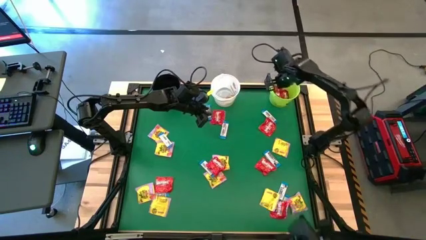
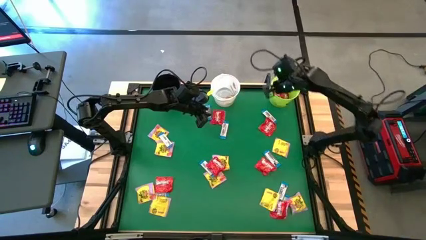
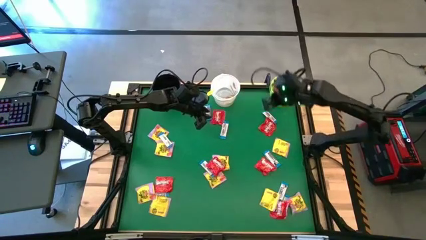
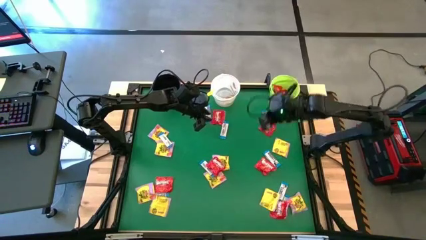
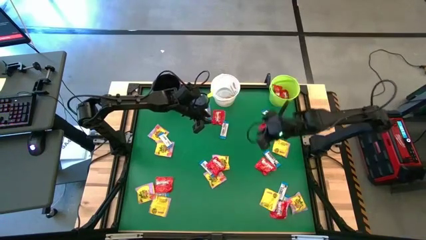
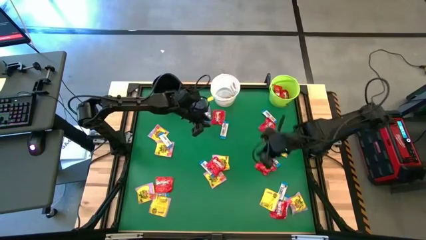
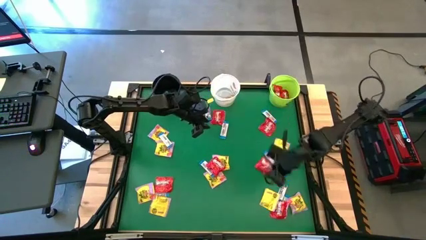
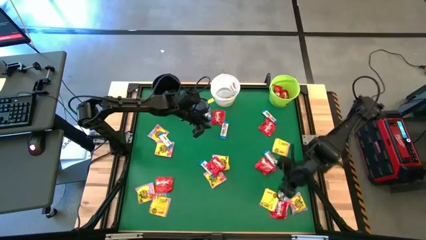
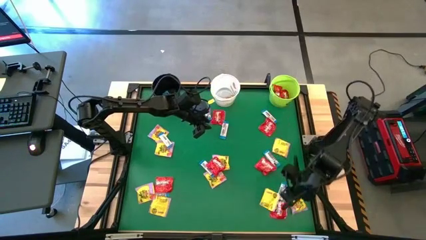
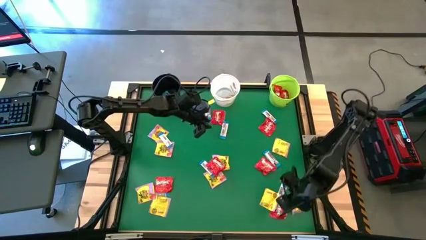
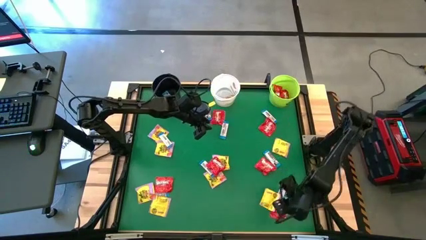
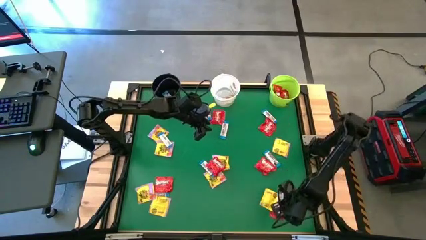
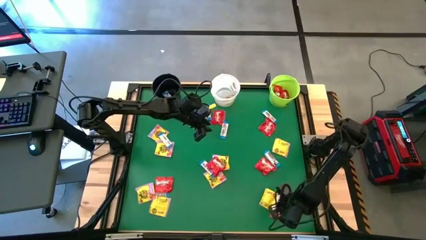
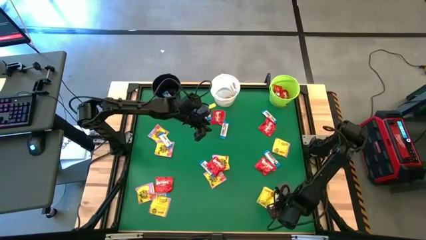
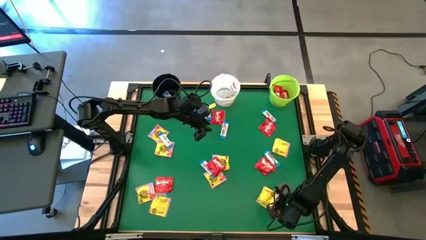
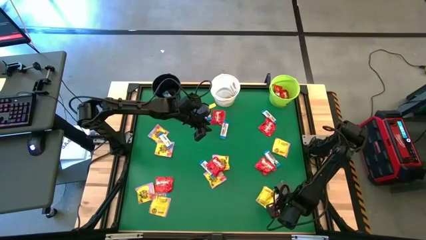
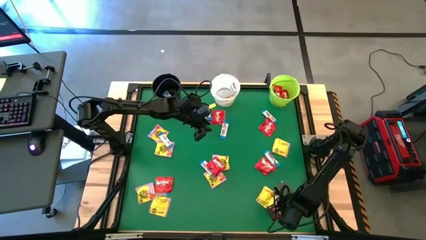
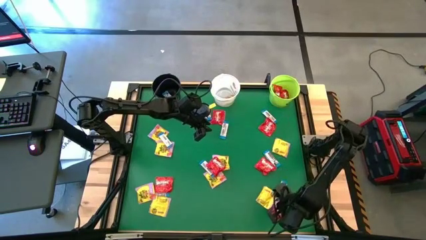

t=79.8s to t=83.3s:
Task: Sort candy by brand, put in halloween buckets
Put the red candy into the green bucket

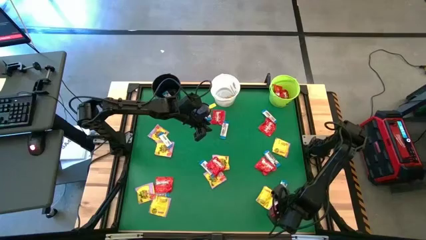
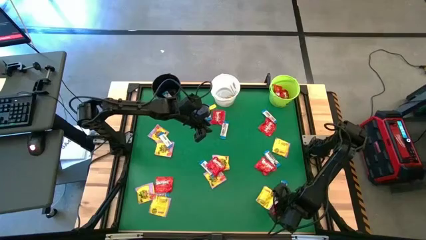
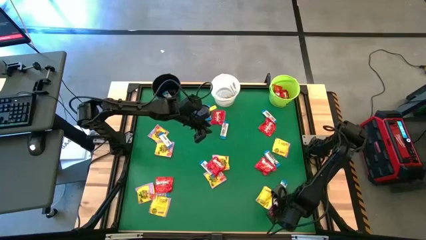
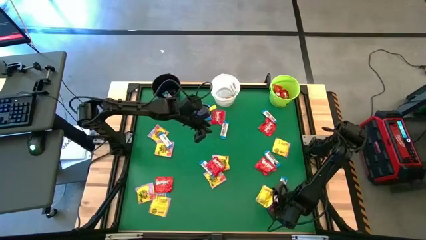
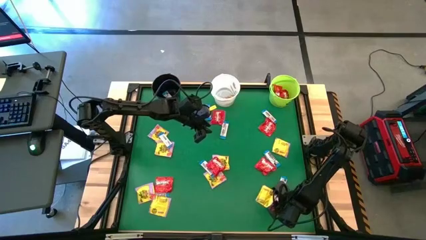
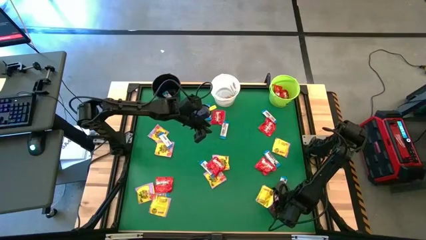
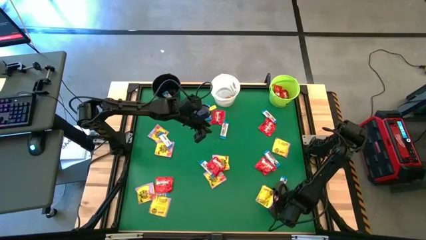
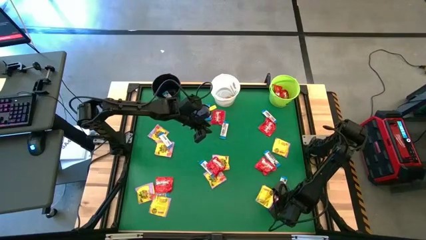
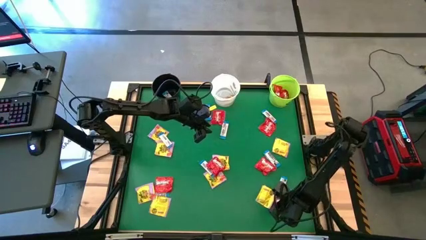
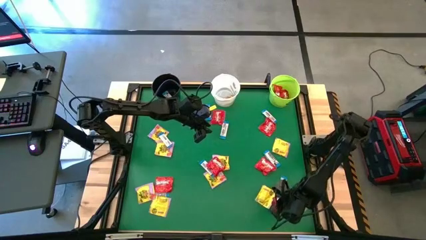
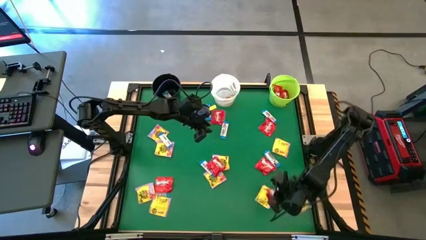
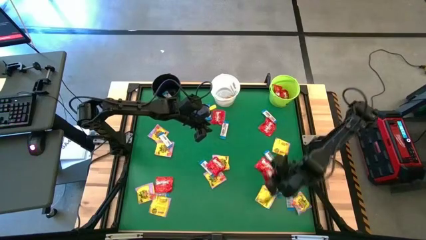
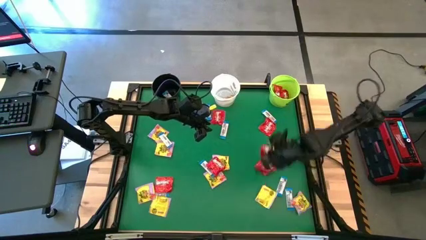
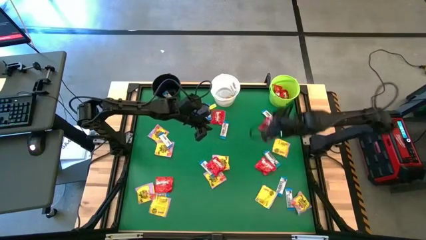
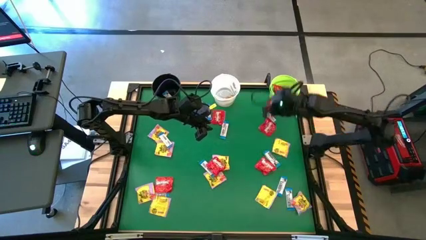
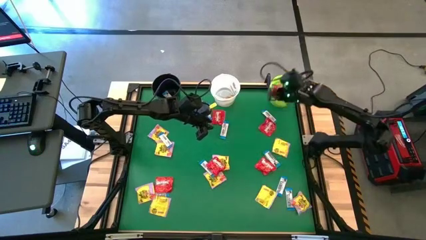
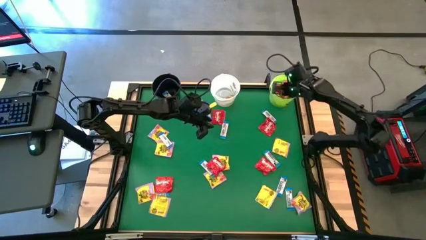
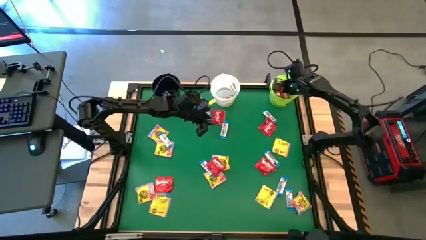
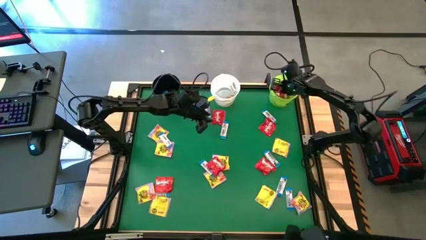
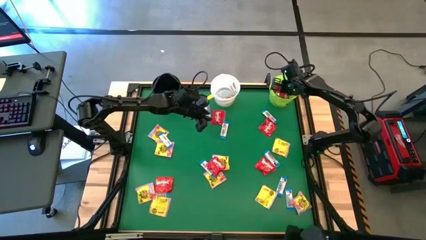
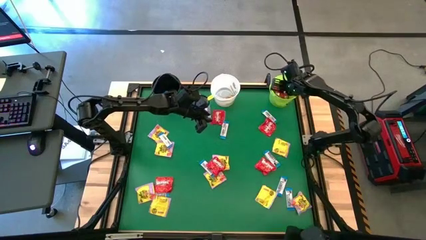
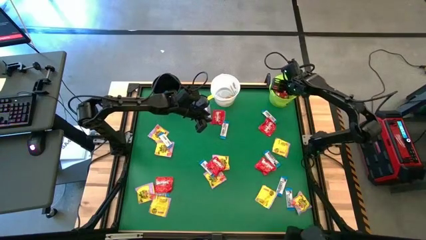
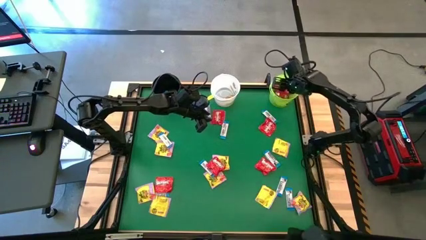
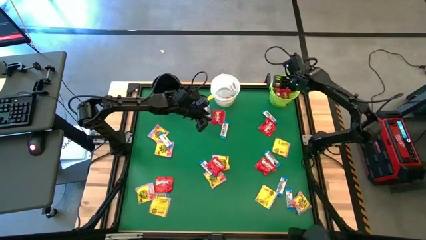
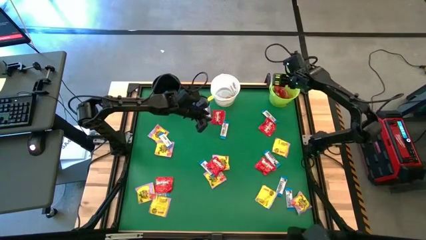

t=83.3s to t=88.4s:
Put the red candy into the green bucket

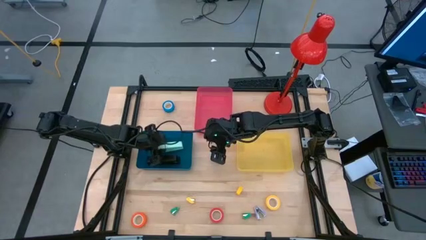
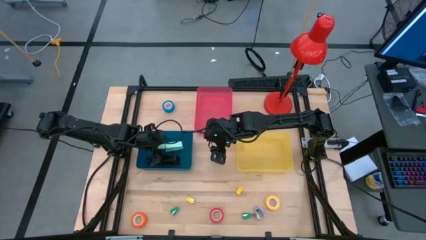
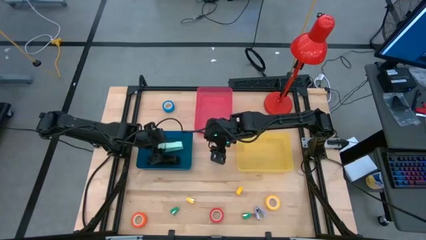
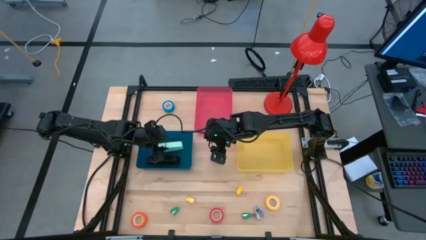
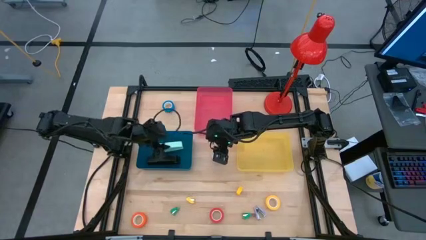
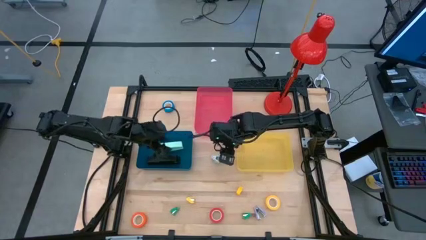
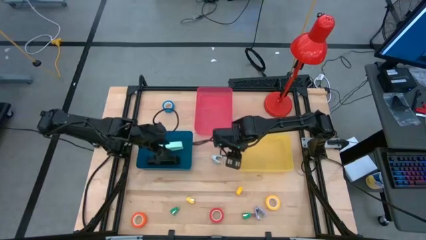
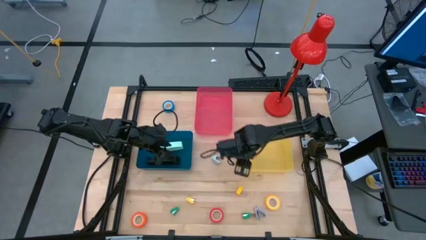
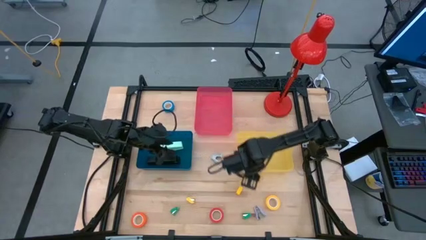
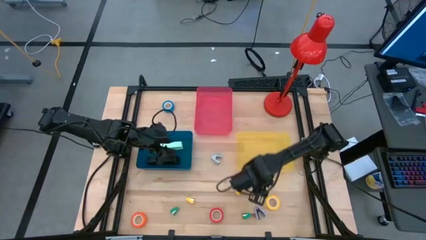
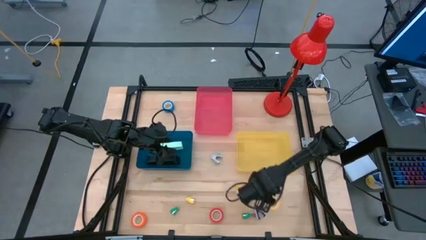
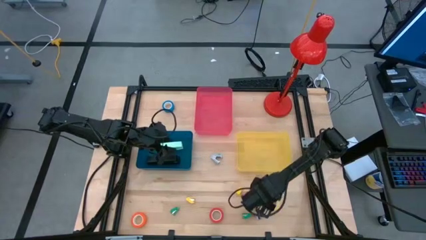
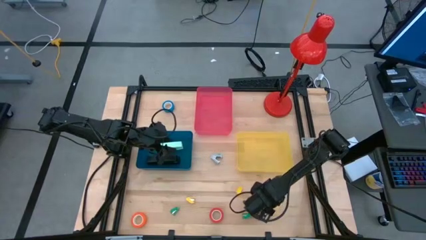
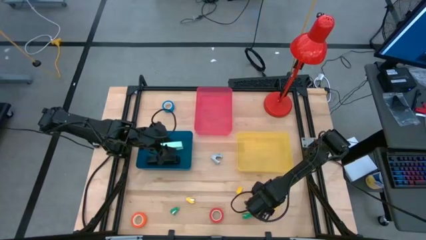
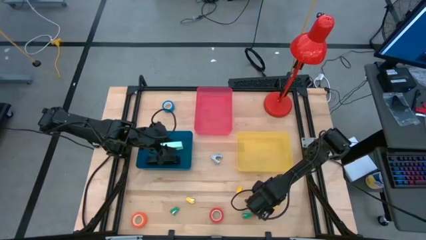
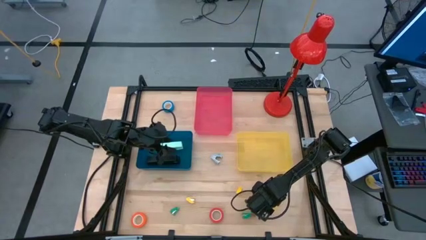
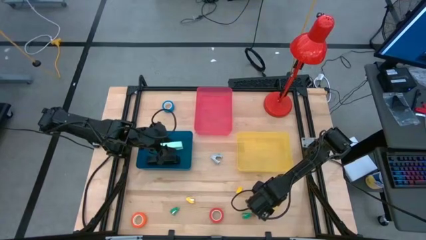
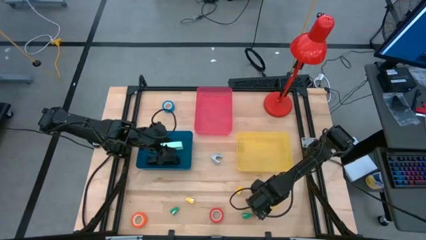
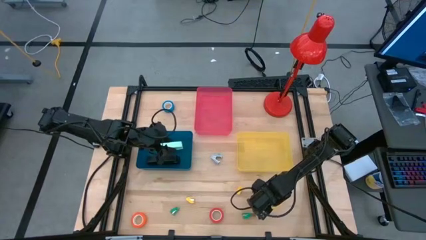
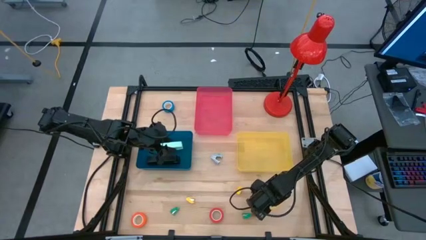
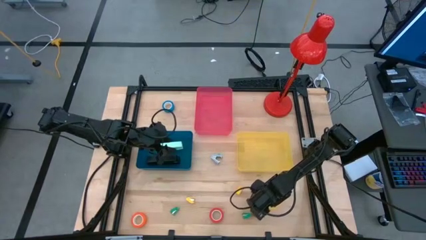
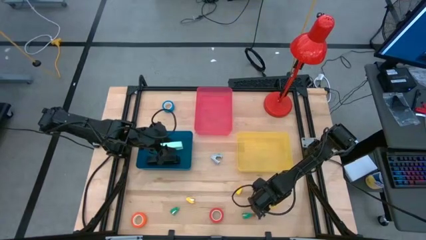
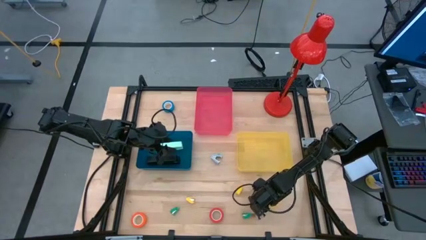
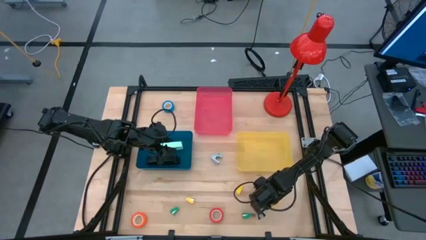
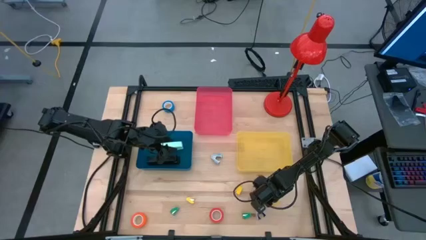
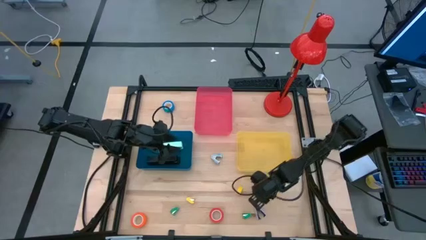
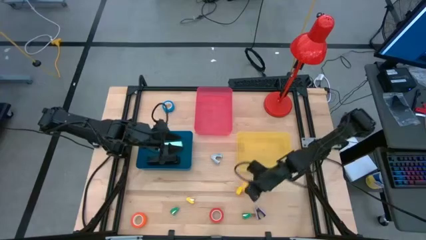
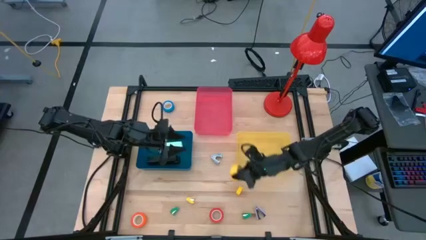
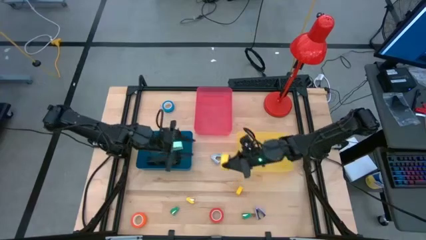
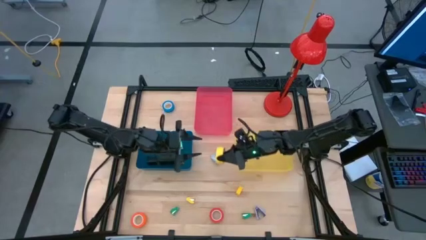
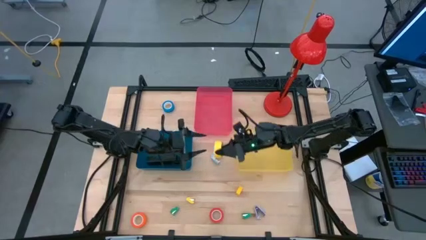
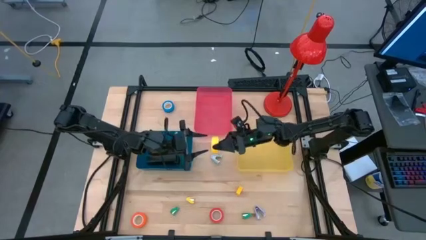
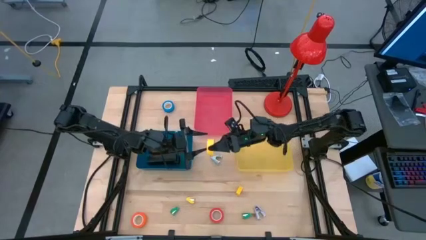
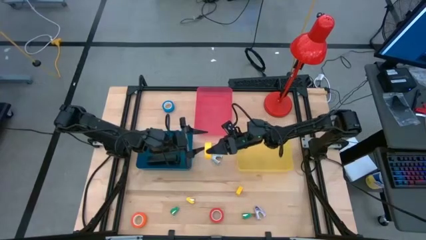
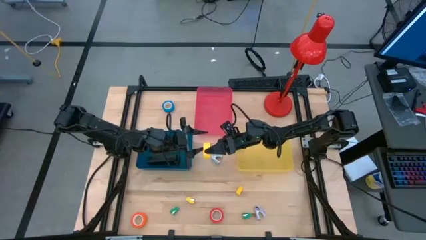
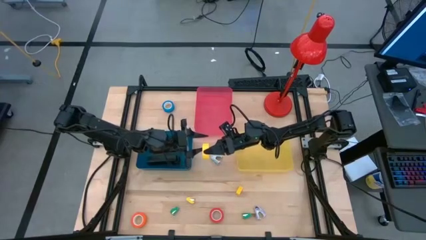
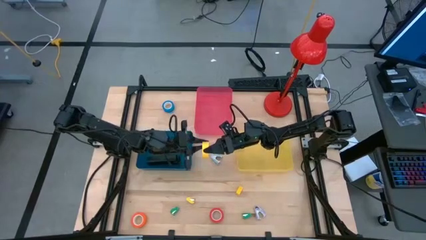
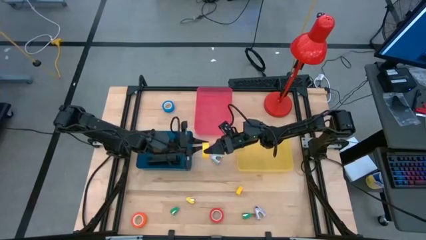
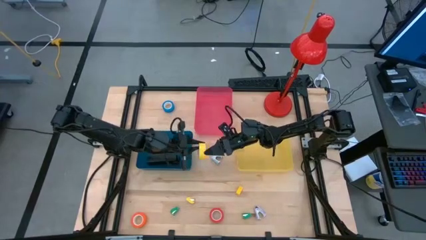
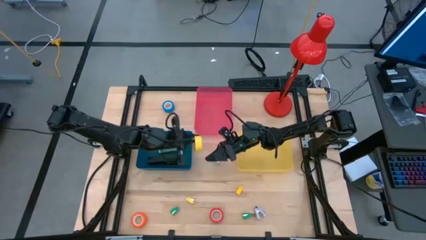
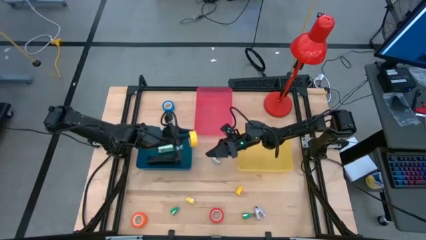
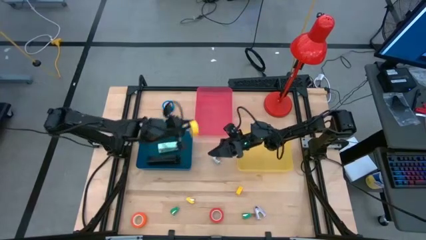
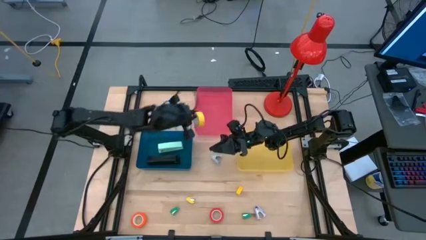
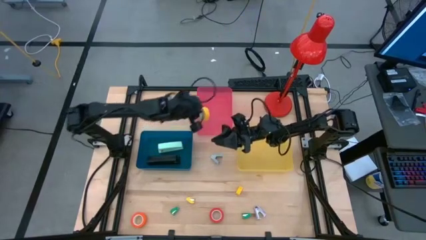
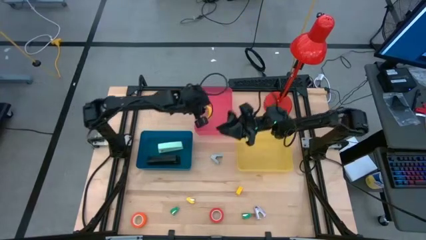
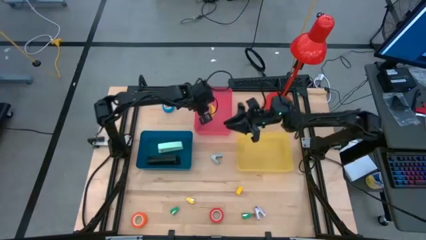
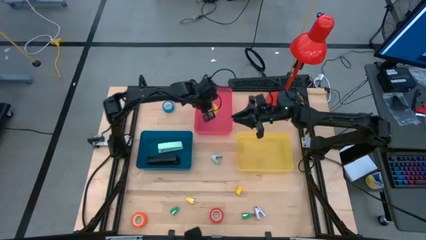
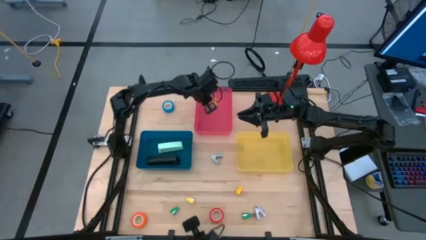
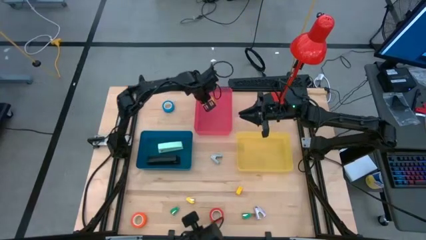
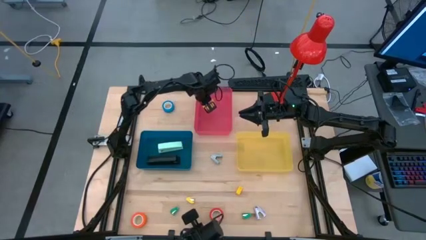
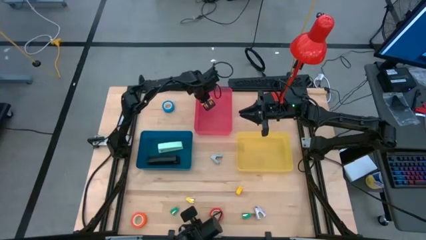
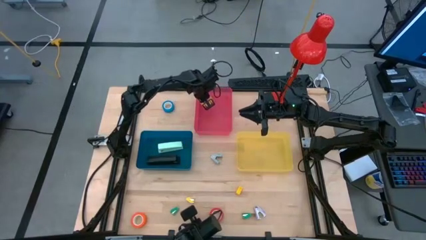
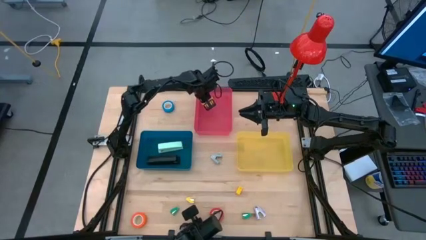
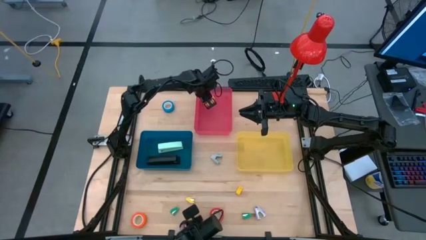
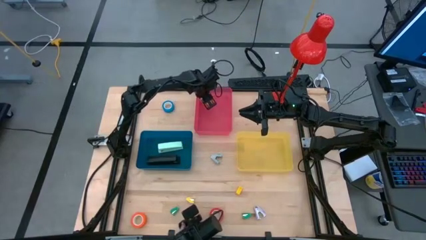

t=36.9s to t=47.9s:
Task: Pick and place Stapler, Stapler remover, tape
Put the yellow tape into the pink bin
